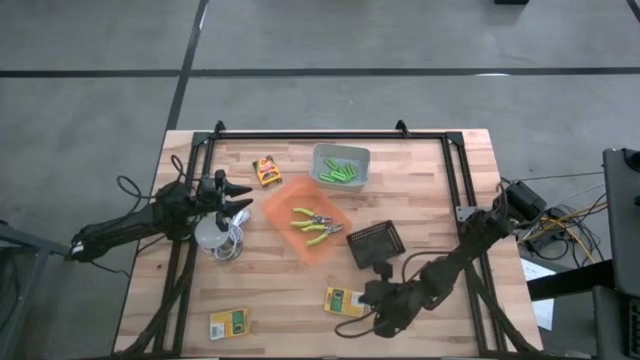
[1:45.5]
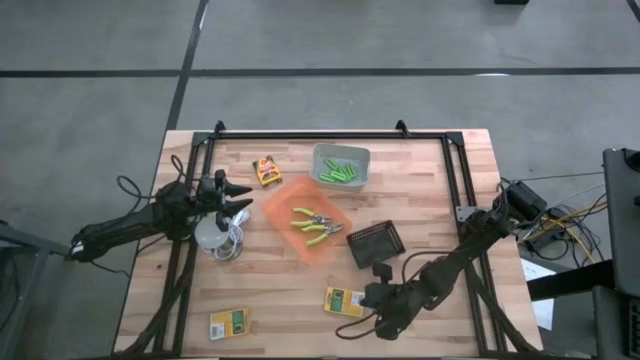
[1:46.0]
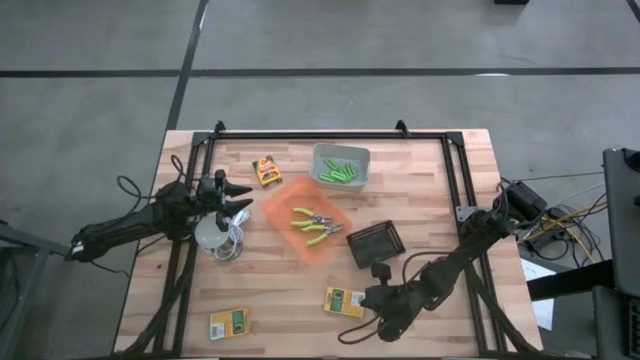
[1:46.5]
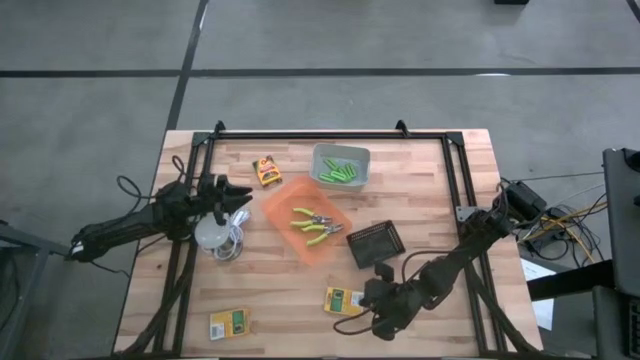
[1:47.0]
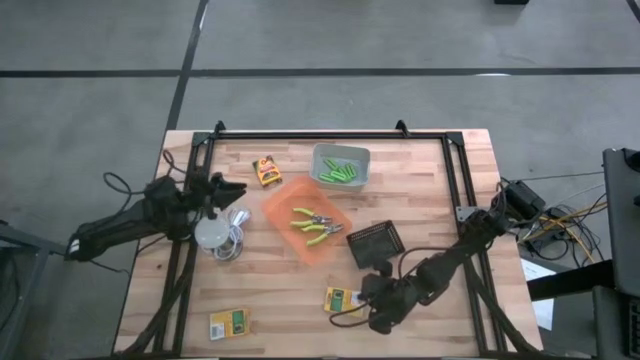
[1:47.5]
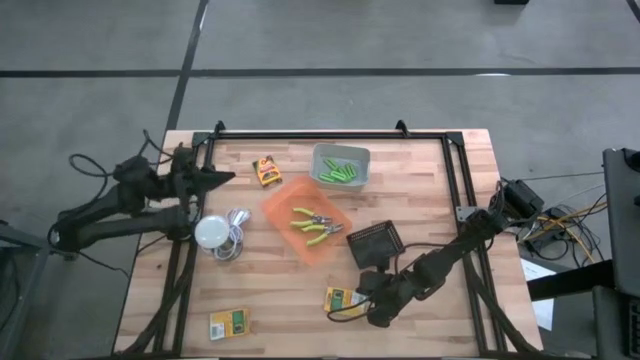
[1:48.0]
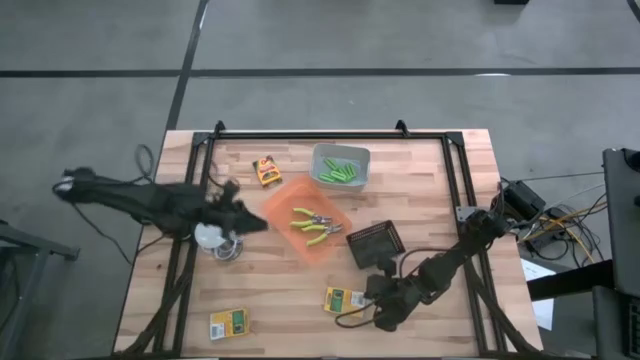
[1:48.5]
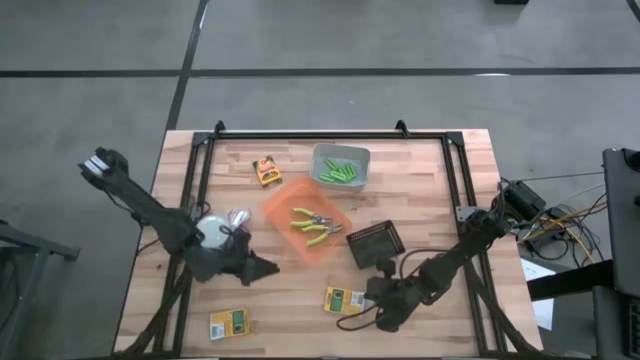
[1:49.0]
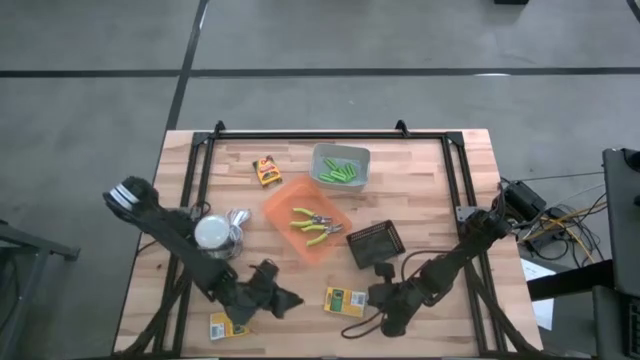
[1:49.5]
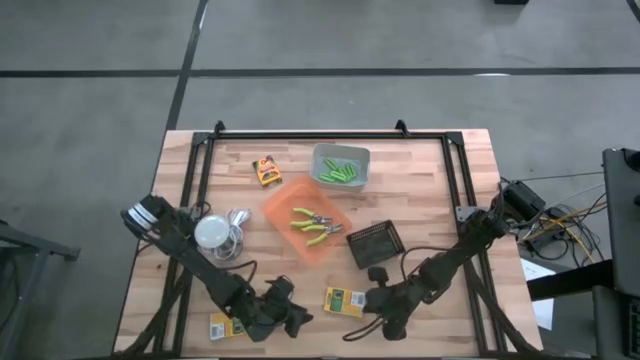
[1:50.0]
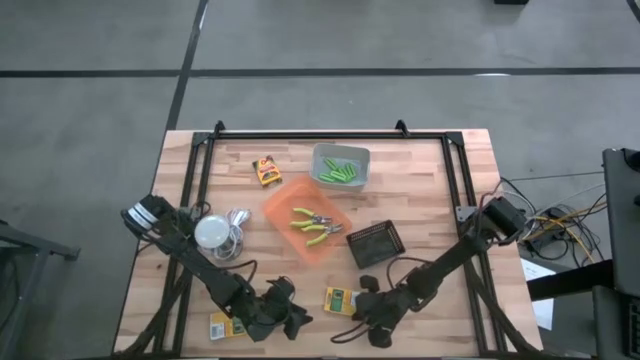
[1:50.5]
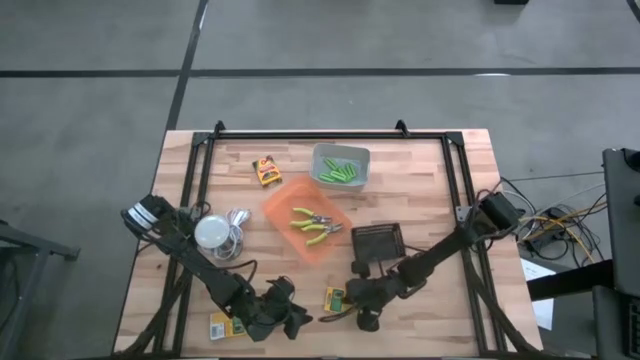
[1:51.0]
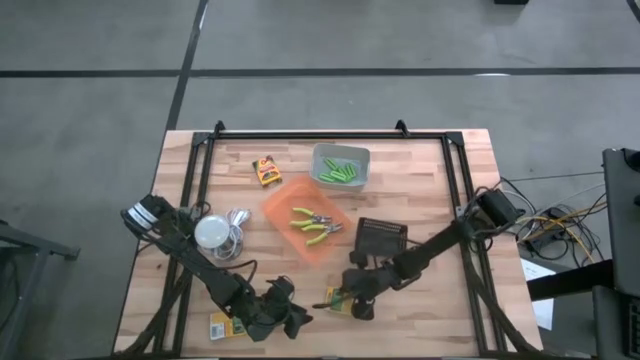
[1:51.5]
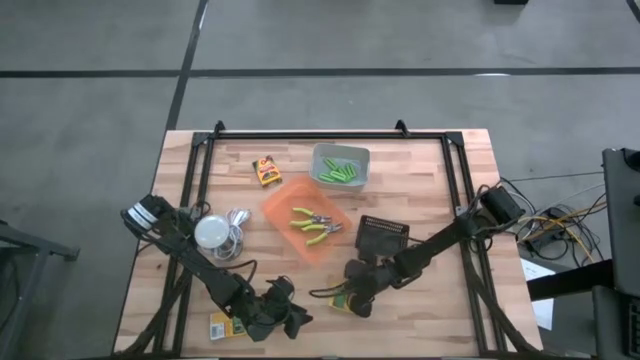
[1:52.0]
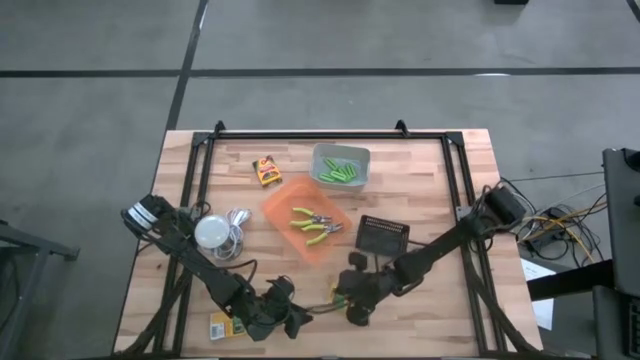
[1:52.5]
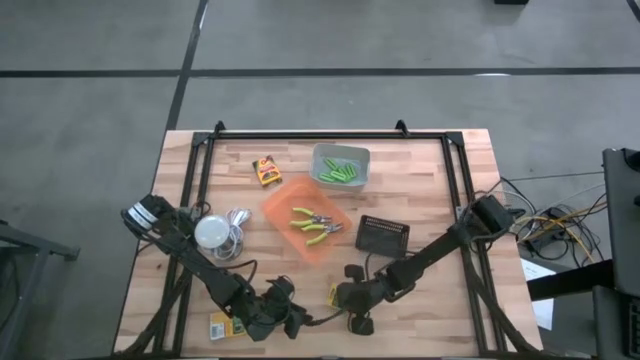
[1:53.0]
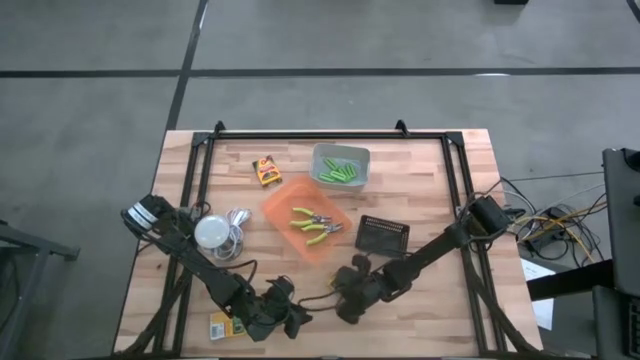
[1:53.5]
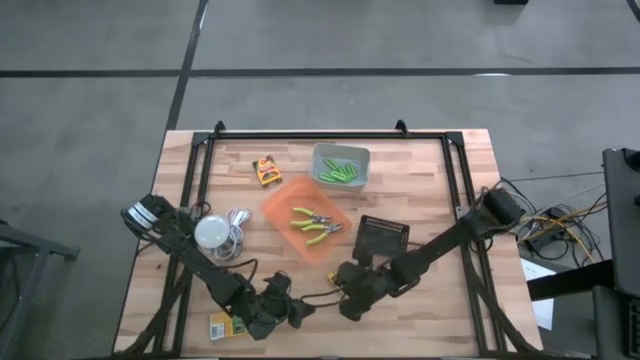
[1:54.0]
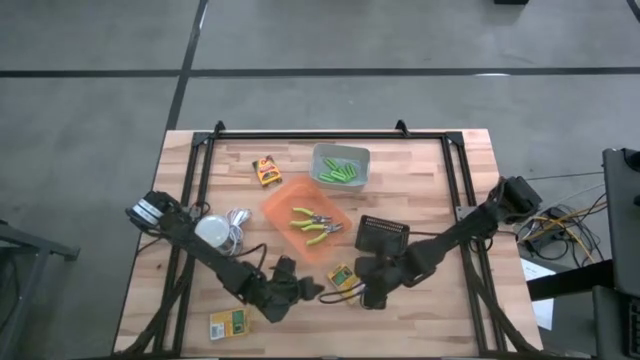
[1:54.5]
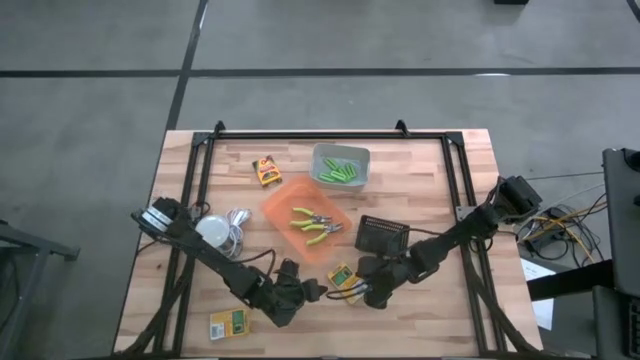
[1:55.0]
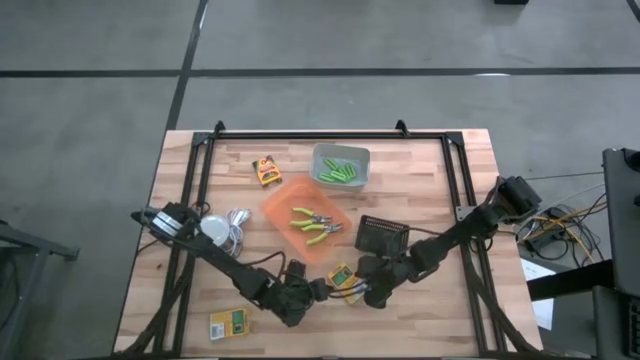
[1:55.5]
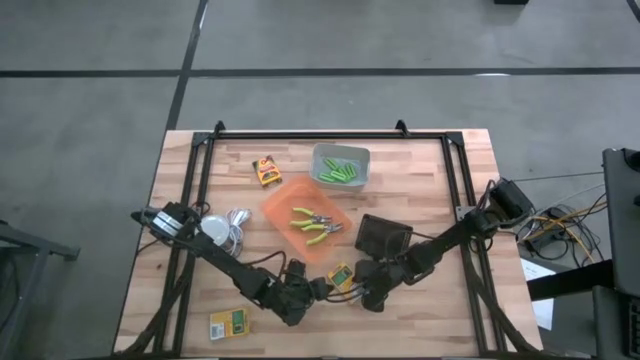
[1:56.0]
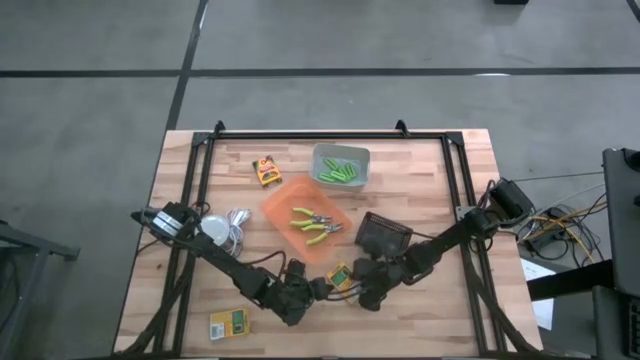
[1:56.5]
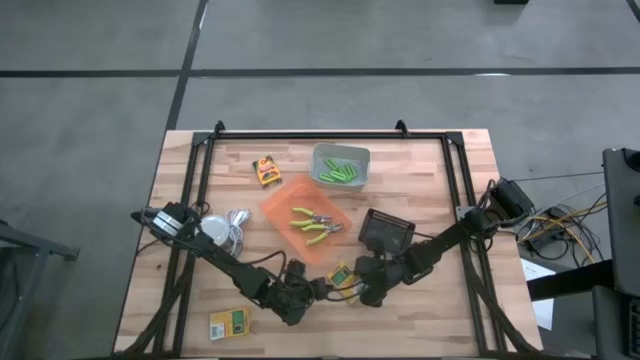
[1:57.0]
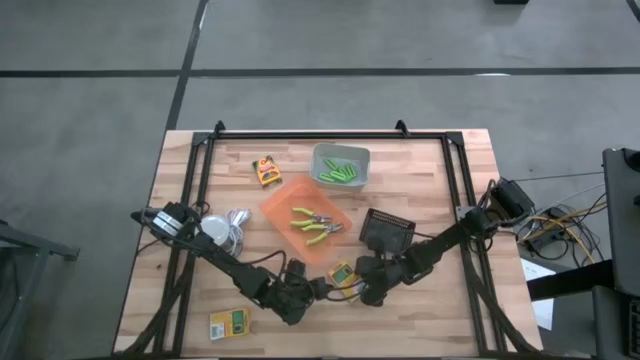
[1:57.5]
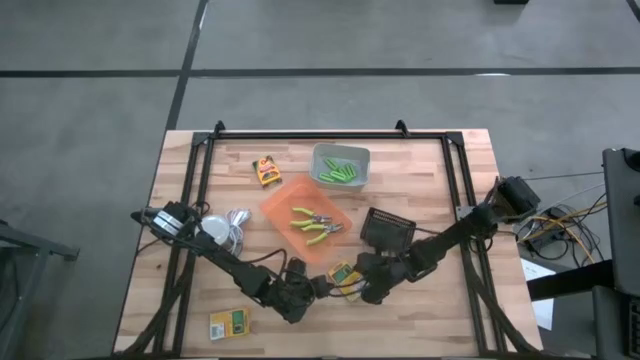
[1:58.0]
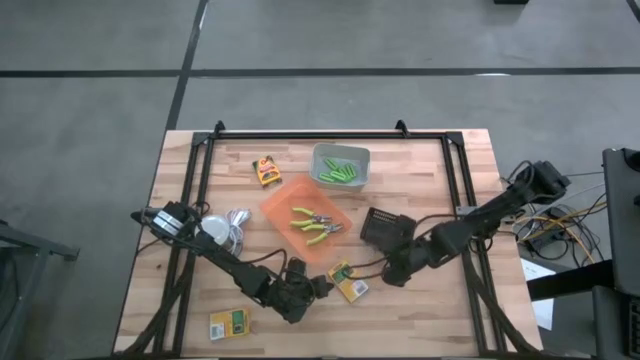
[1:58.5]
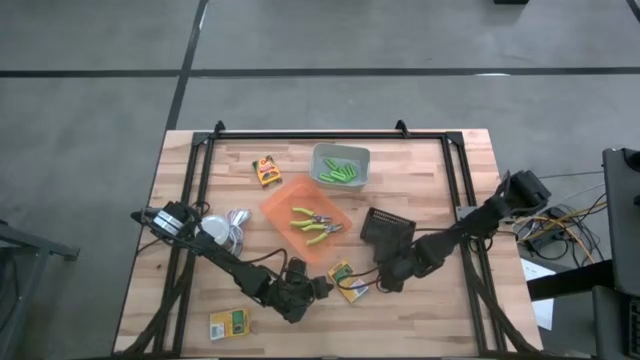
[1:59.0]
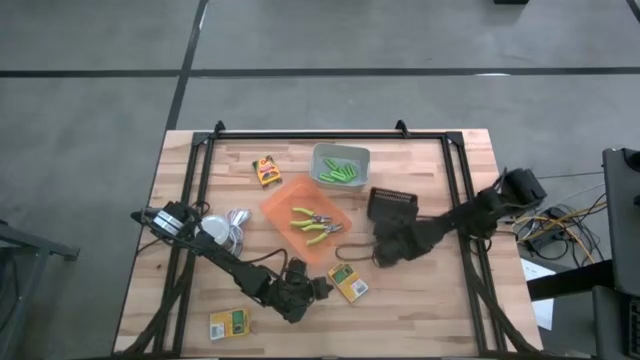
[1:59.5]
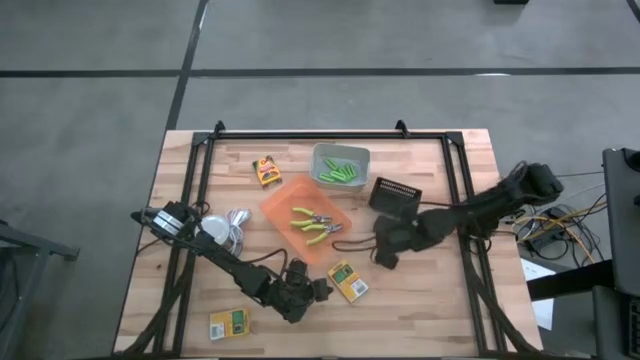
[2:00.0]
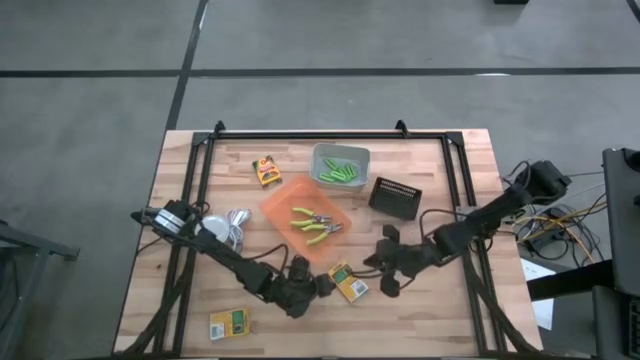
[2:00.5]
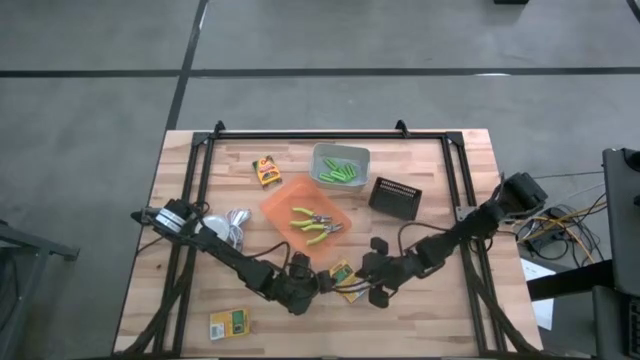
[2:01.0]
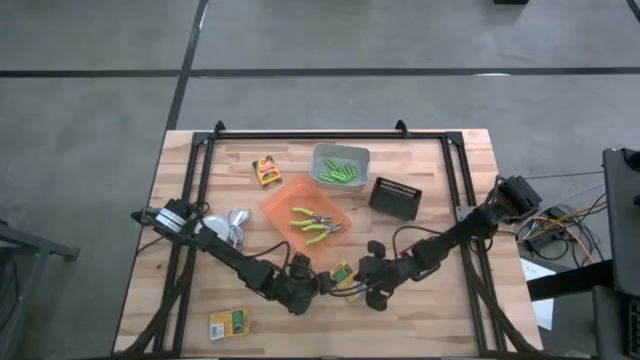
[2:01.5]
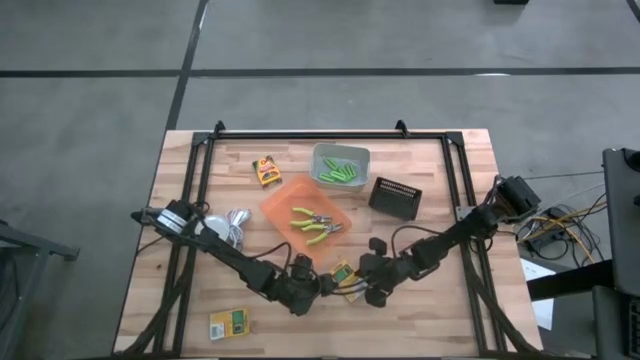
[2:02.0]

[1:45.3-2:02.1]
Task: Pick & Place School Supplies
Put the yellow crayon box into the black bin

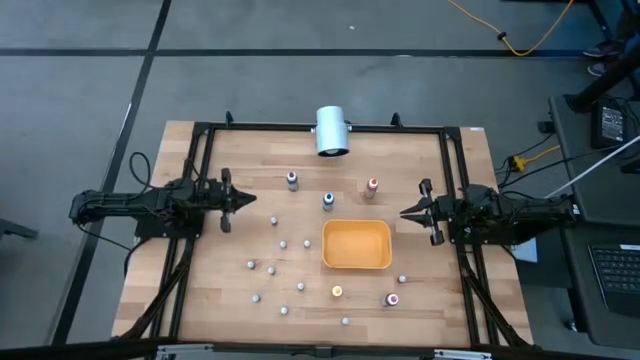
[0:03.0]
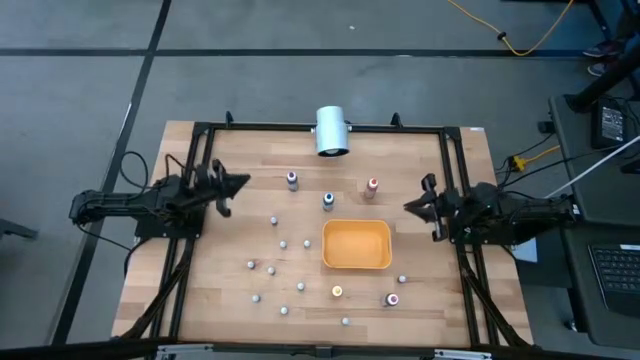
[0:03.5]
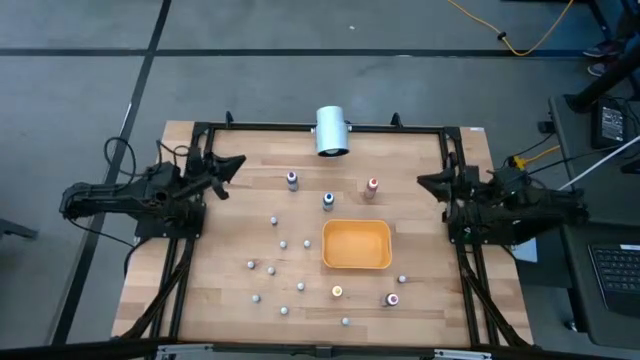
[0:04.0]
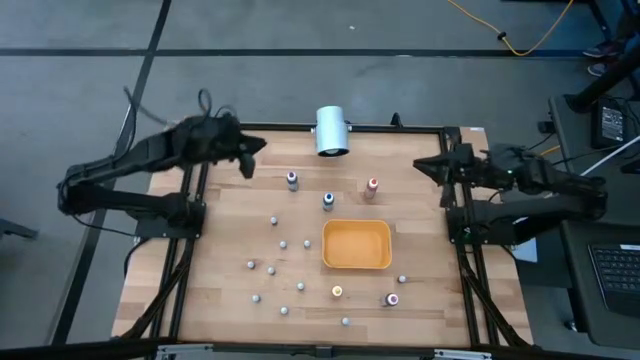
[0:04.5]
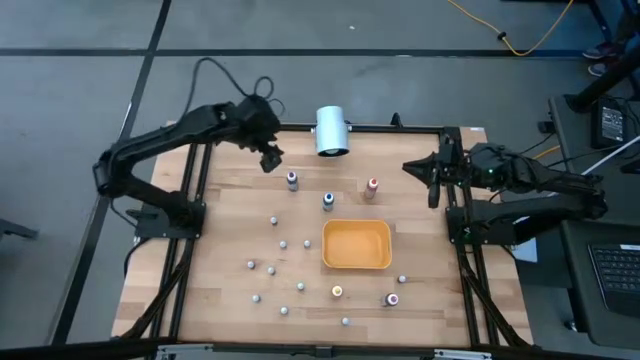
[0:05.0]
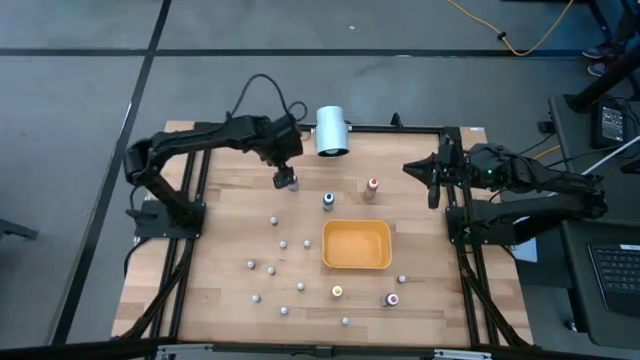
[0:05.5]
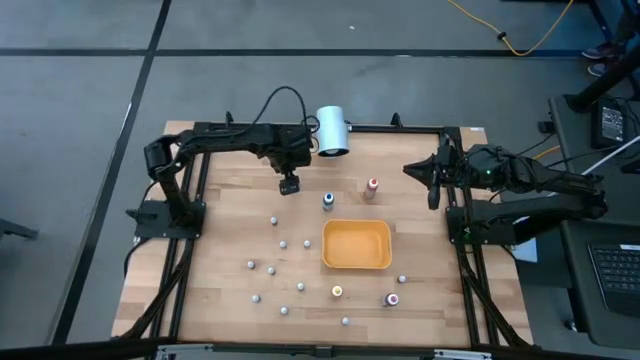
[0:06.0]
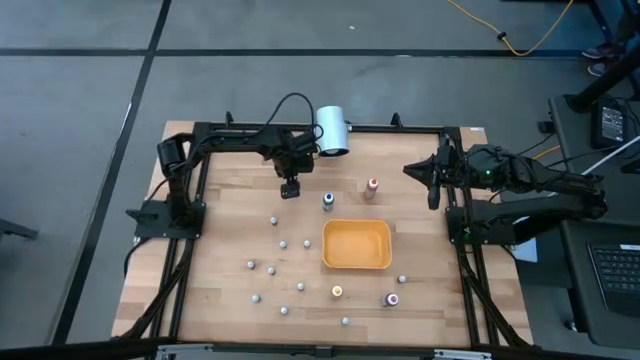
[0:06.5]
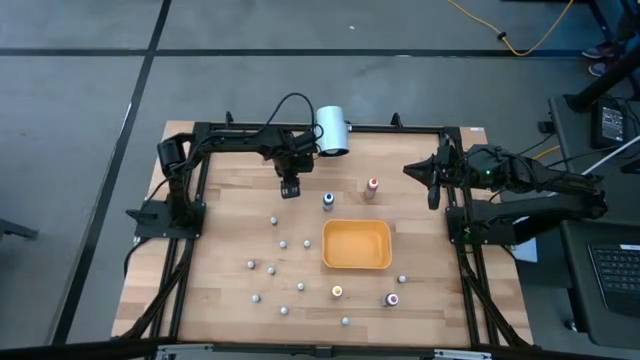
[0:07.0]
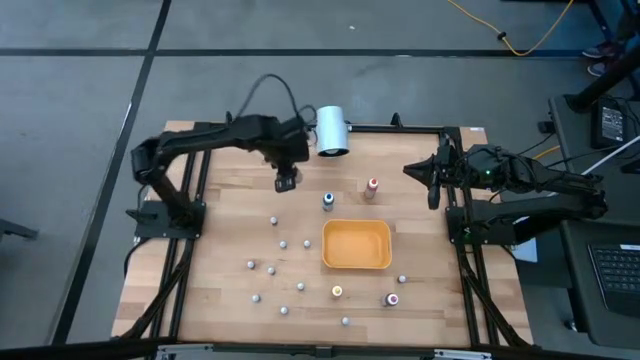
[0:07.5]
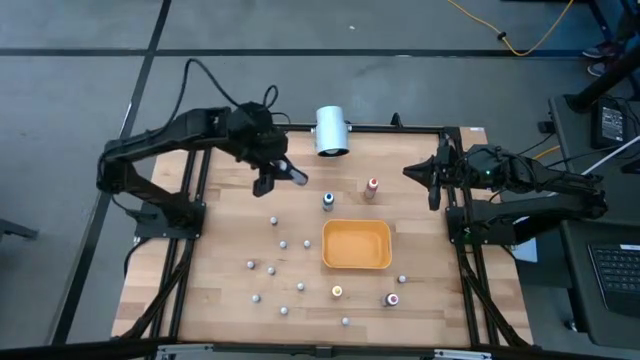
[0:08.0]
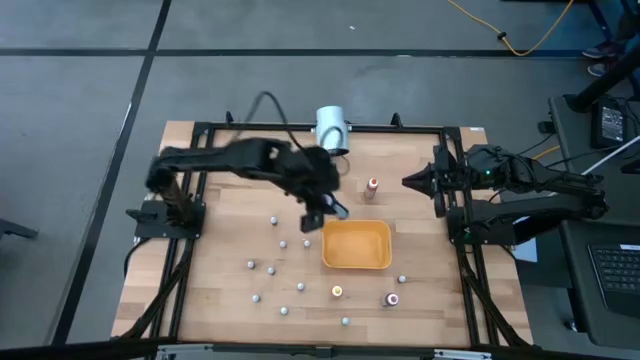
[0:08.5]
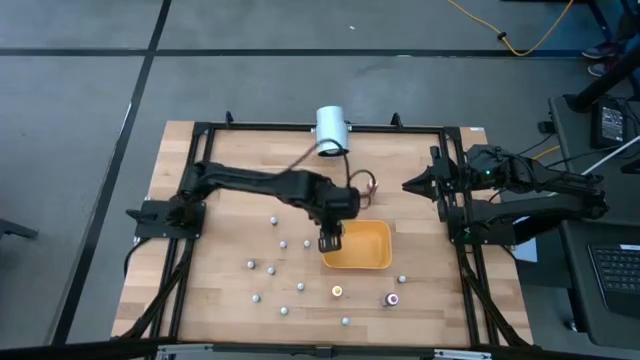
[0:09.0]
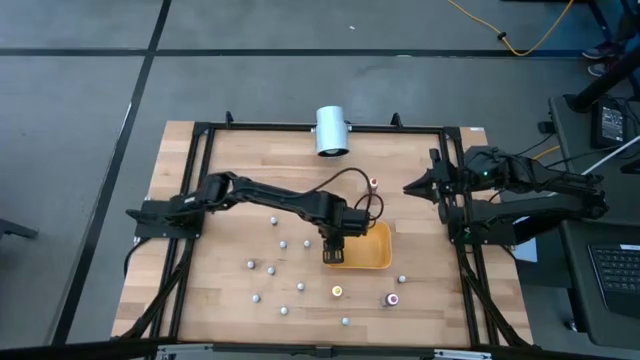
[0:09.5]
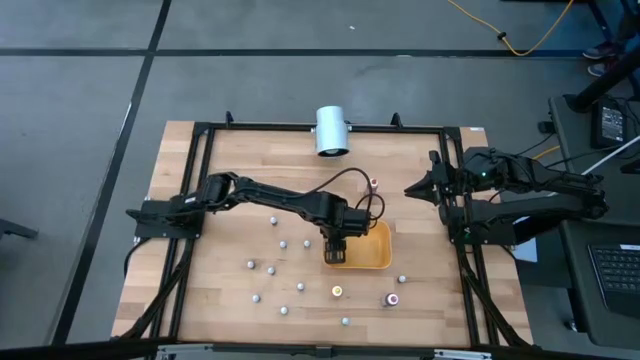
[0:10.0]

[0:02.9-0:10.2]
Task: Pick & Place food coloring
Put the large purple food coloring bottle into the yellow bin
